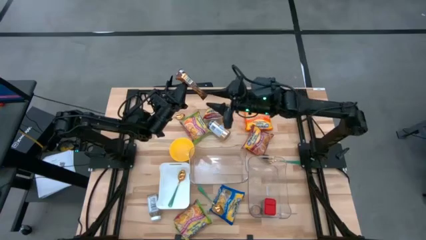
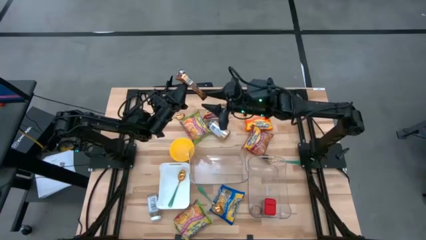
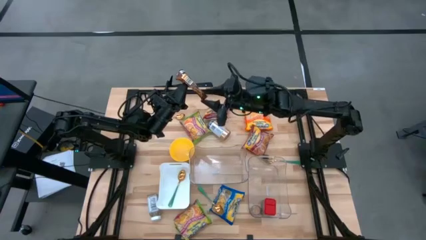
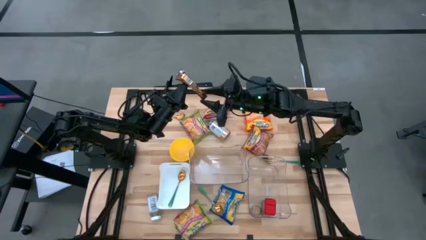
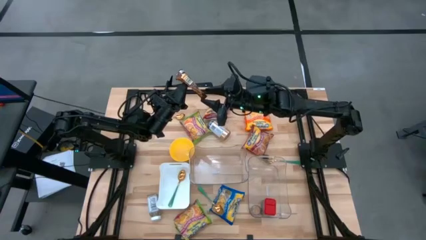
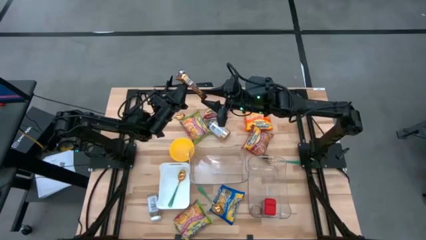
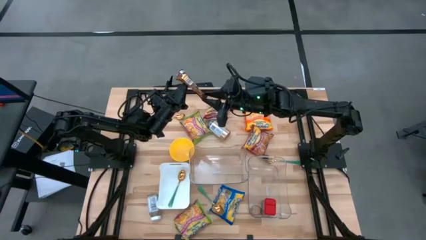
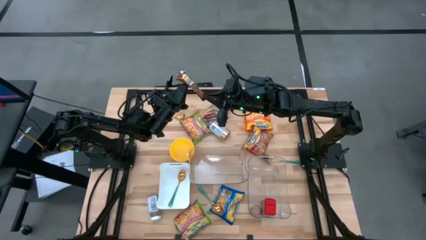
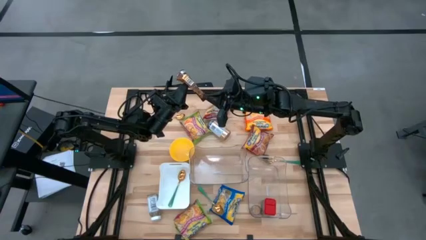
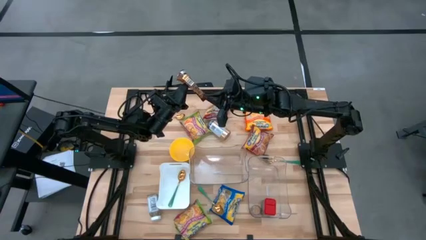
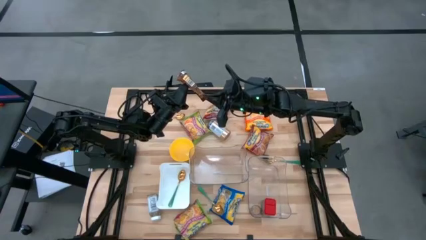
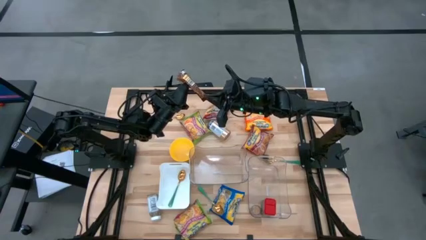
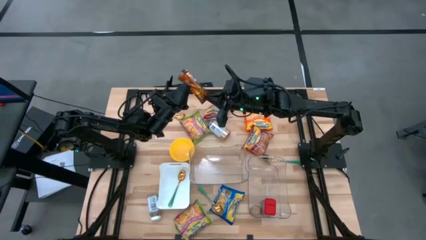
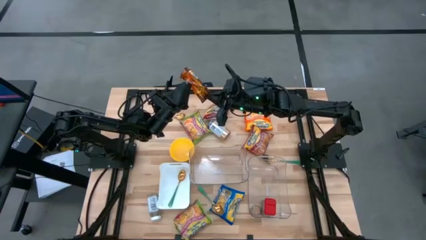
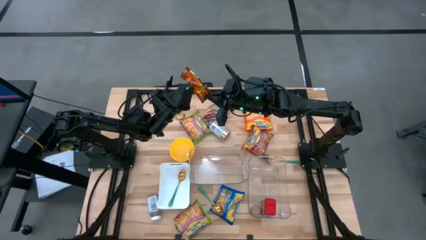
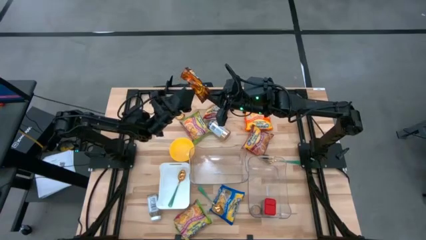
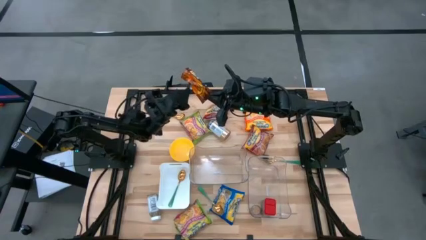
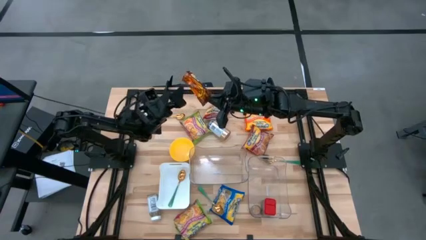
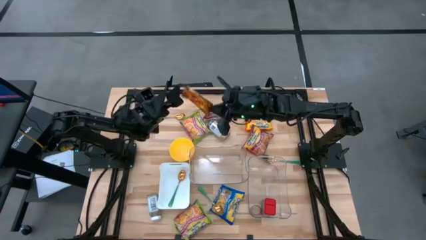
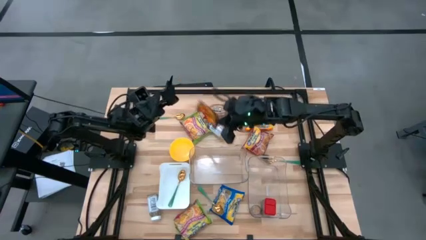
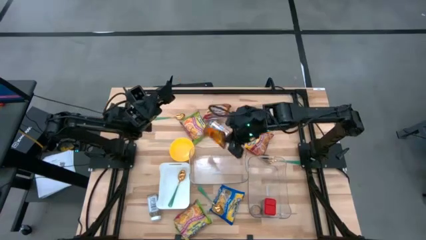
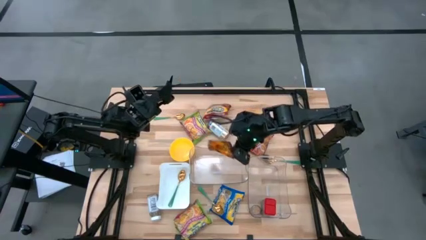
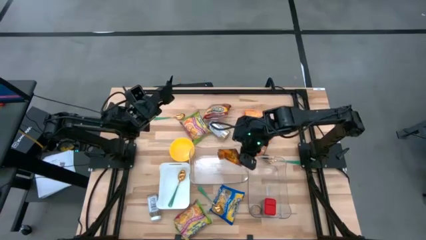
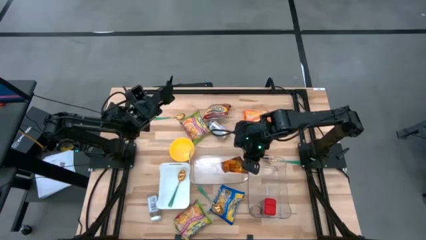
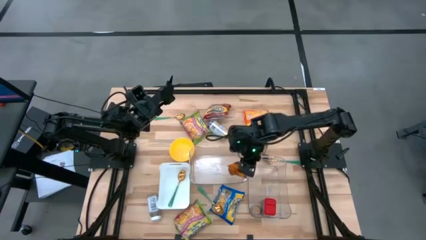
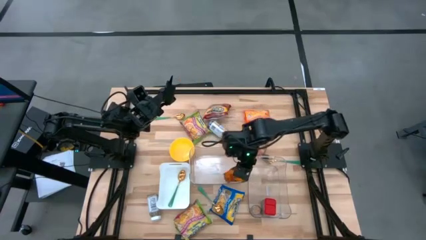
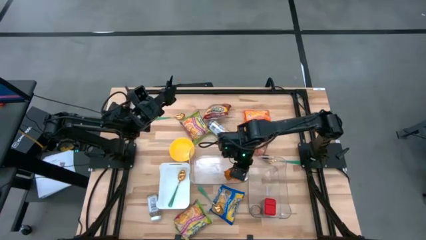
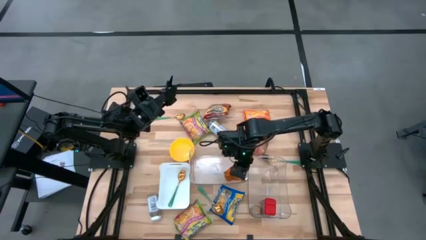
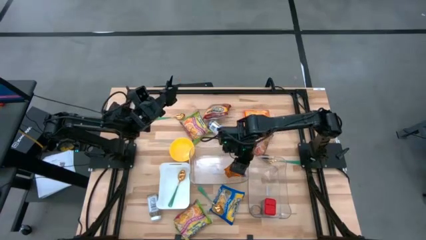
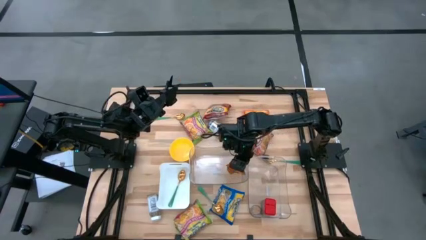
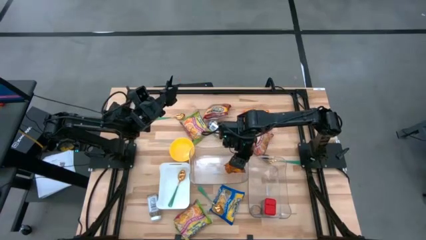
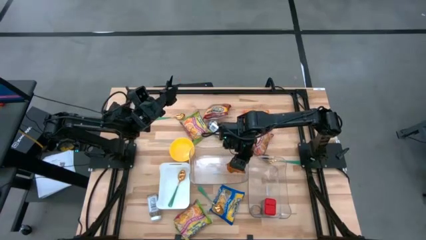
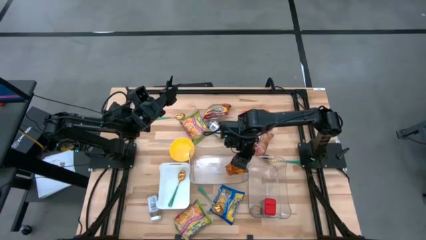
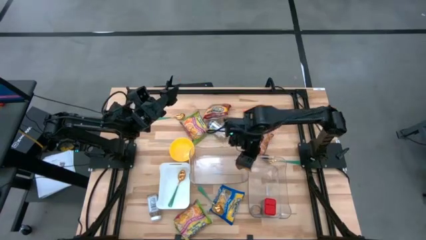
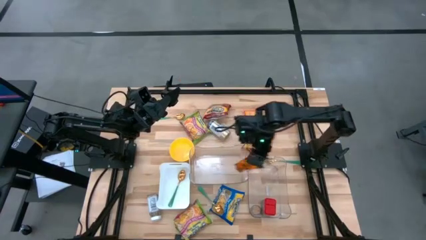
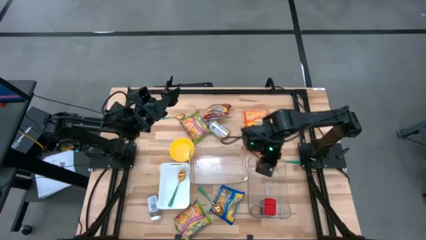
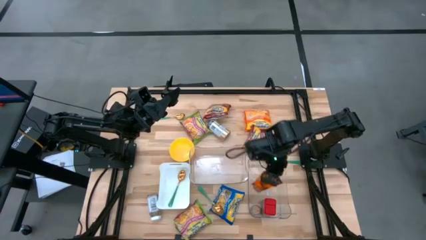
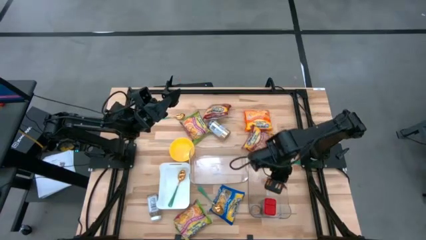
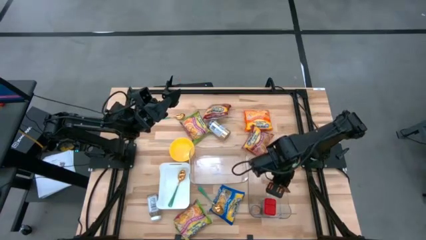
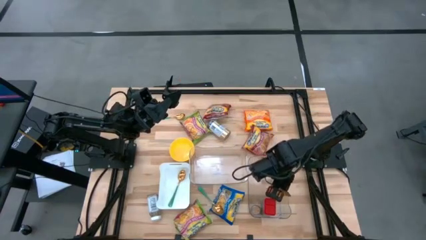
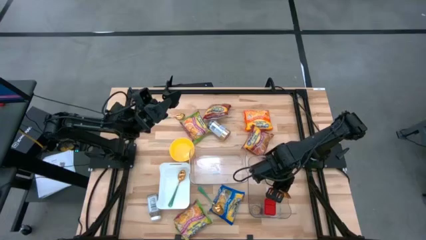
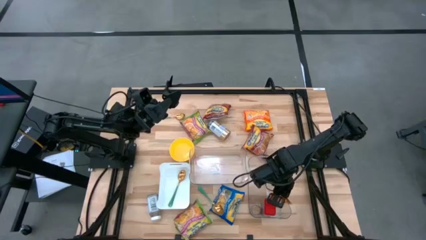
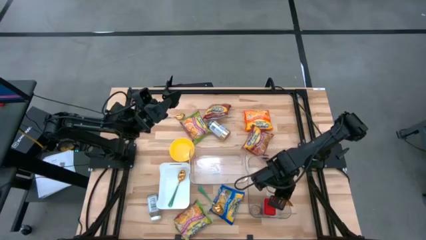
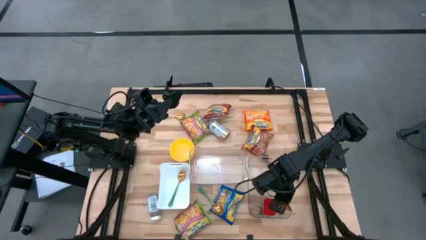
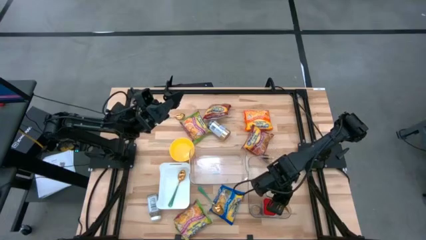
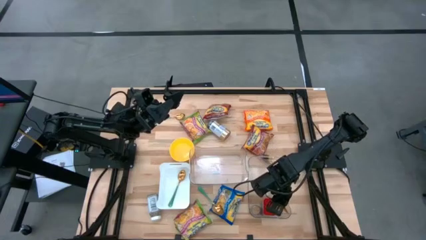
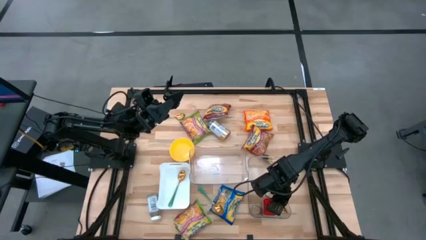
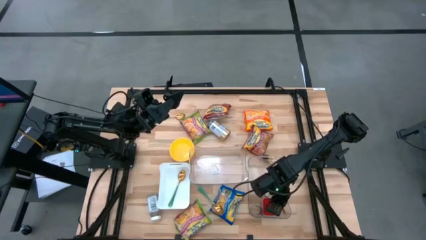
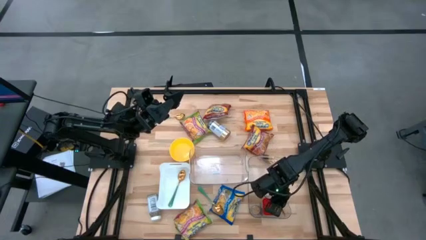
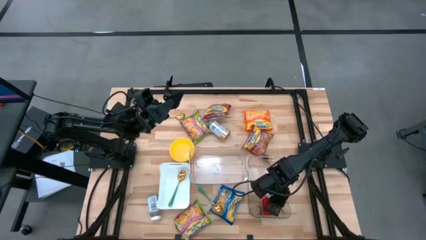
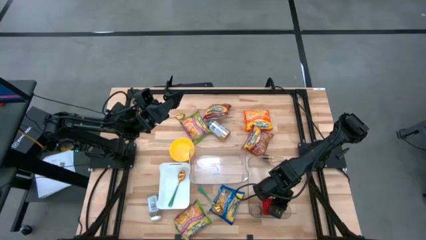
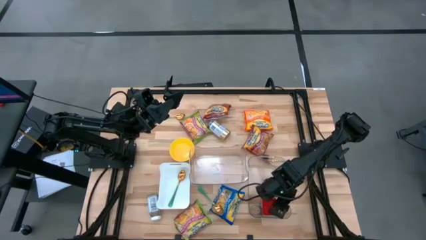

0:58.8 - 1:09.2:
Task: Pick & Place Food Item
Put the orange seasoning pack into the right transparent bin

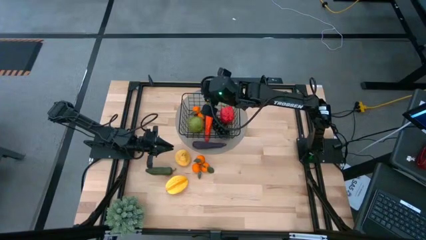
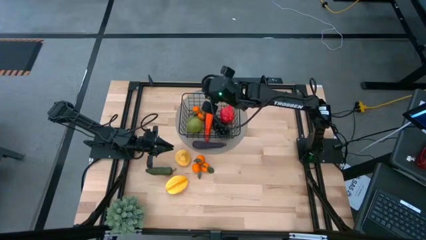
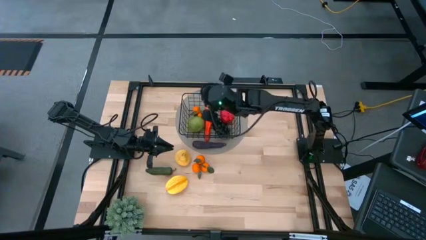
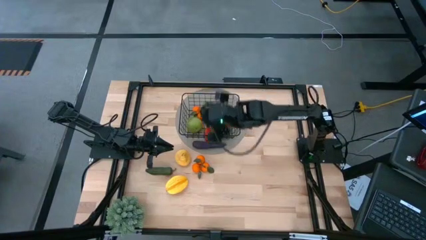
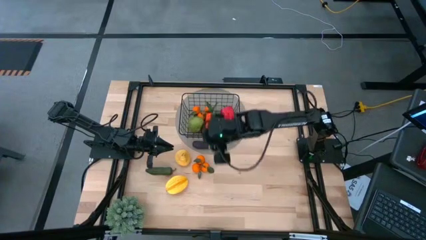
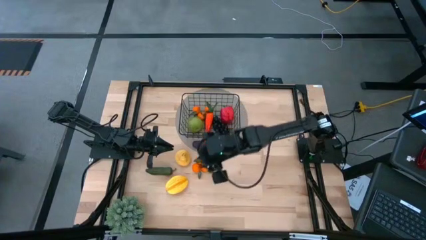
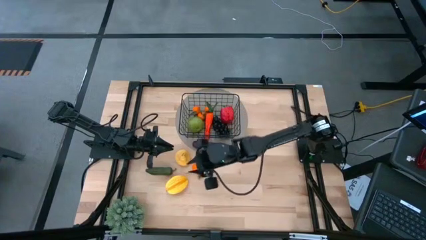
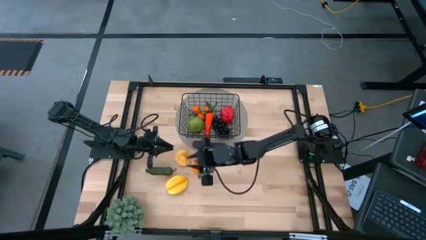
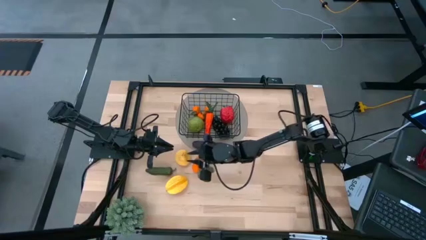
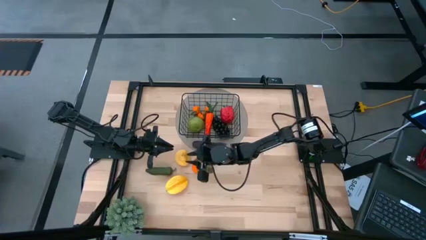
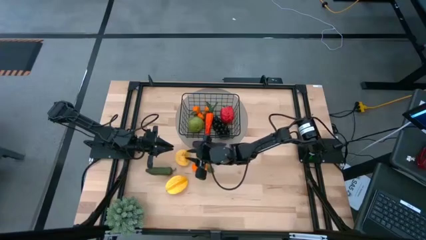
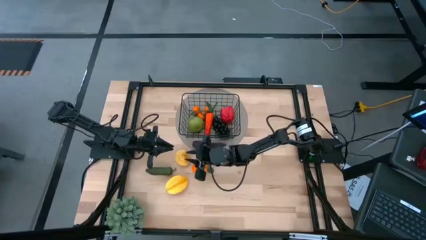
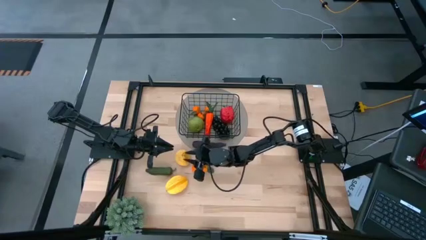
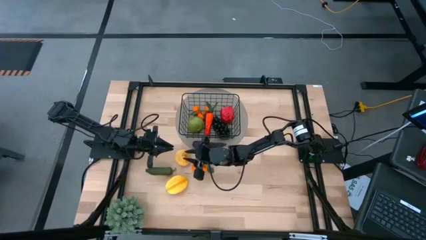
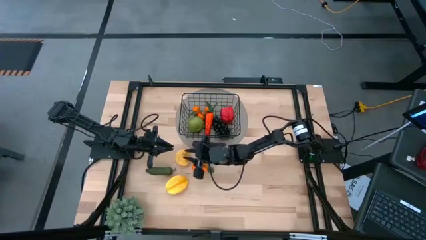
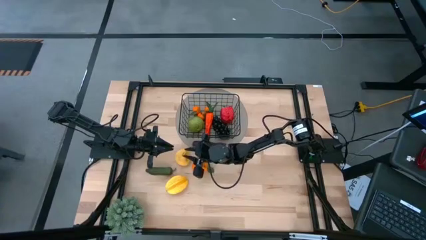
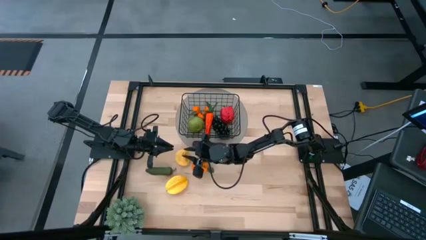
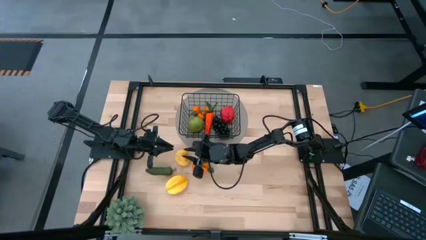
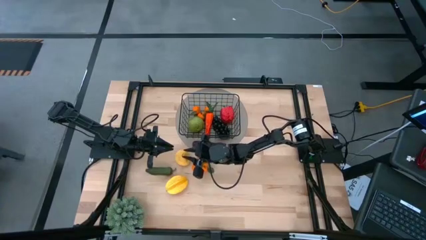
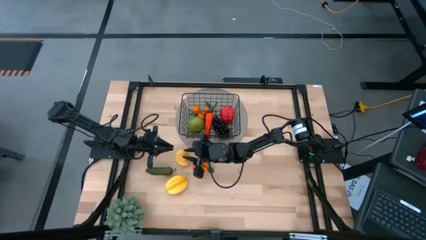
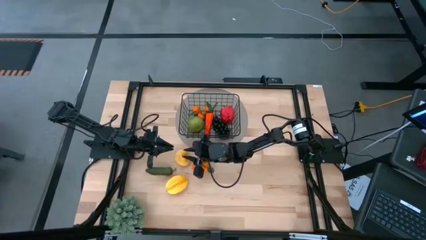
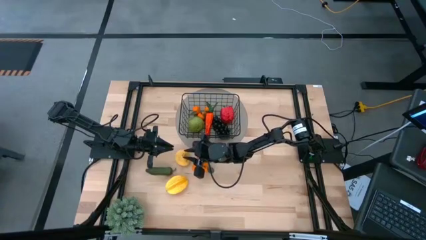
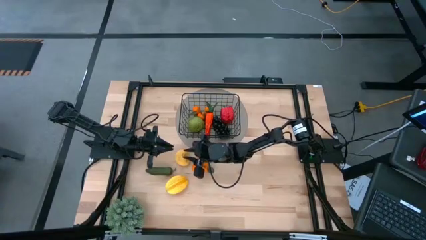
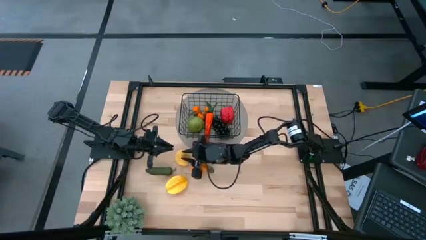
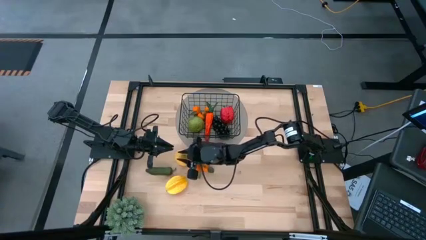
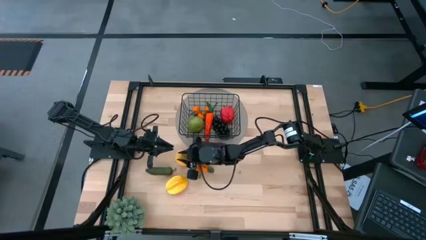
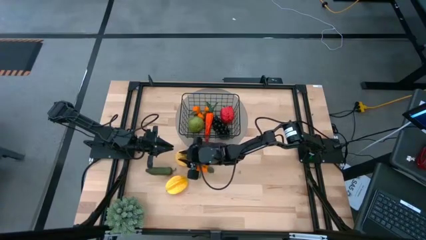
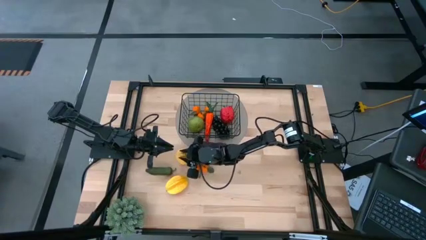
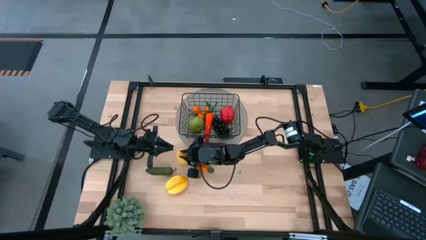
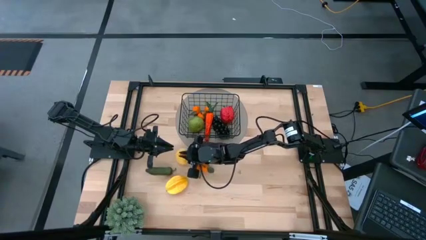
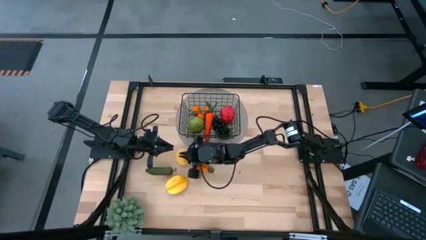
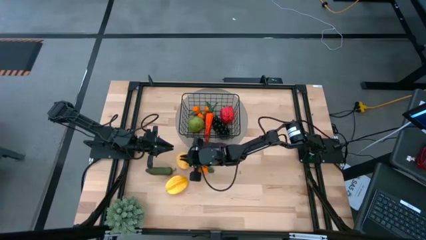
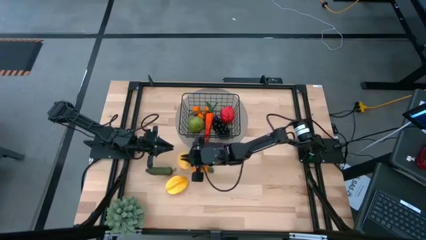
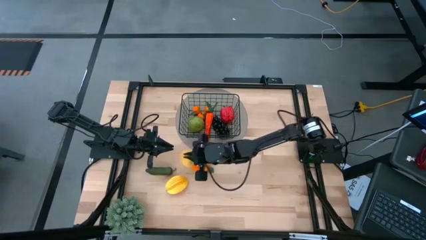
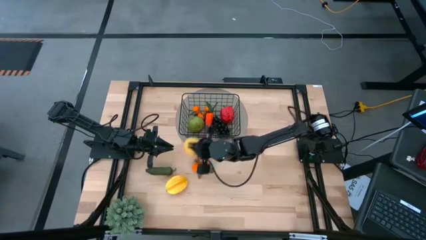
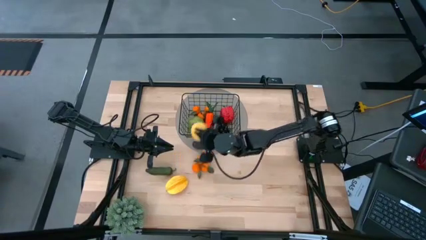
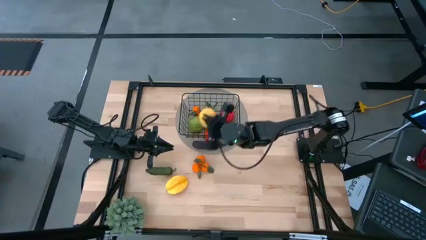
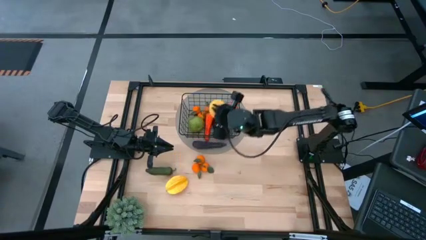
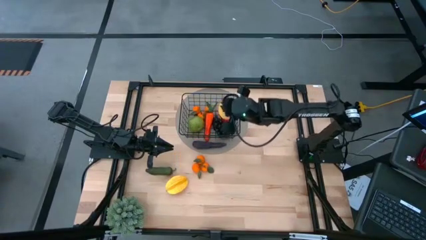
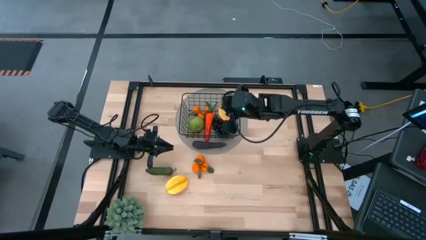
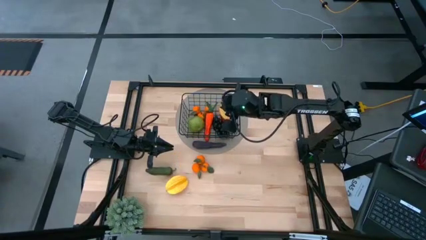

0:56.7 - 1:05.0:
Task: Build produce basket
Put the yellow pear into the wire organizer
